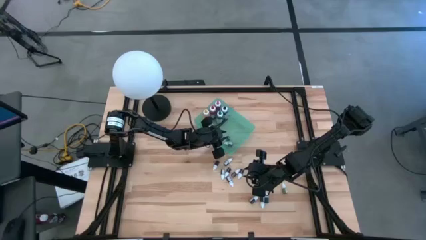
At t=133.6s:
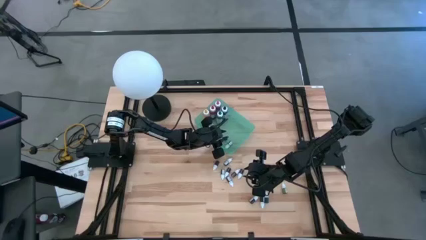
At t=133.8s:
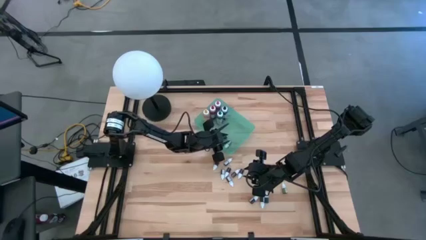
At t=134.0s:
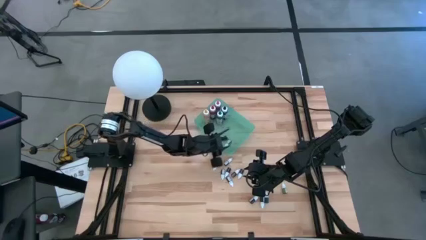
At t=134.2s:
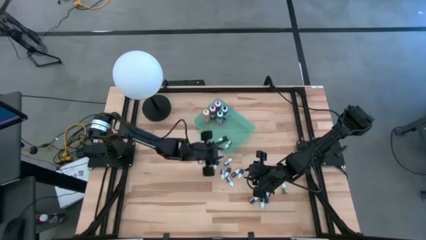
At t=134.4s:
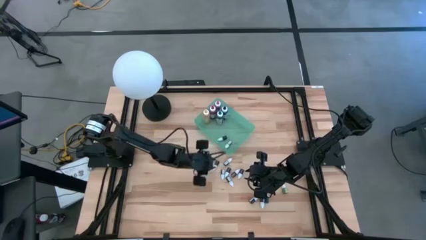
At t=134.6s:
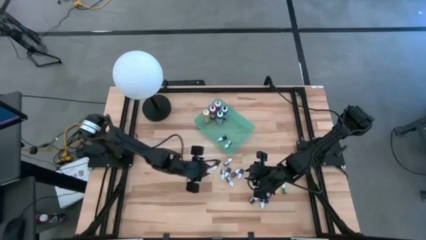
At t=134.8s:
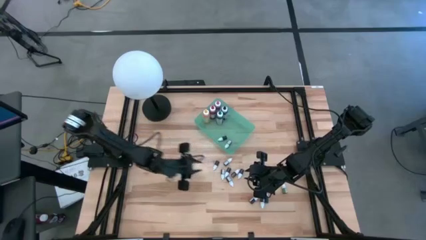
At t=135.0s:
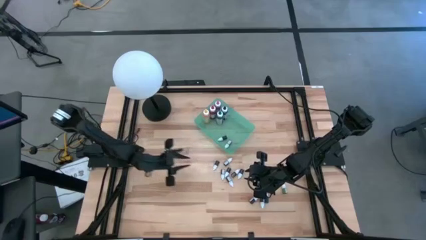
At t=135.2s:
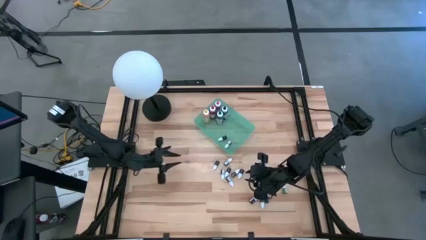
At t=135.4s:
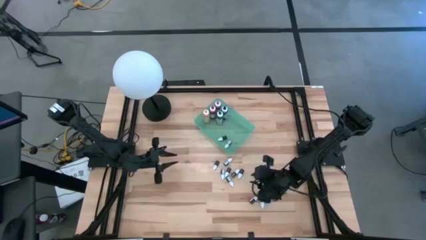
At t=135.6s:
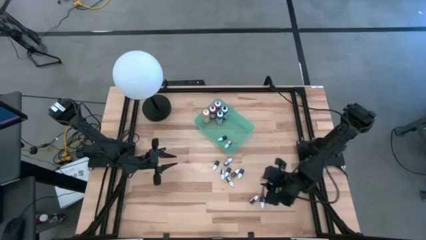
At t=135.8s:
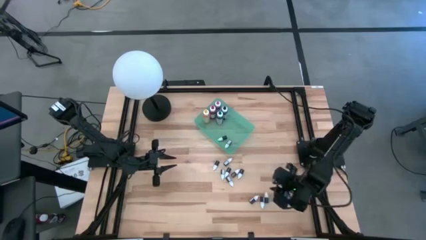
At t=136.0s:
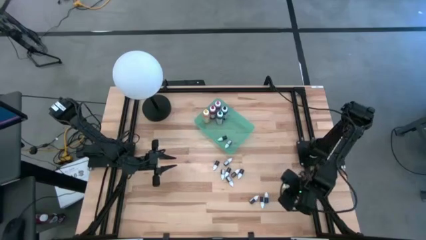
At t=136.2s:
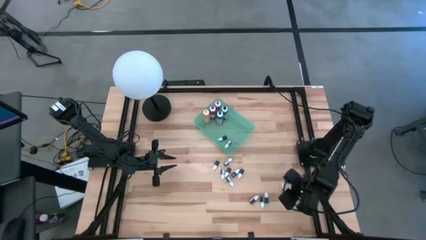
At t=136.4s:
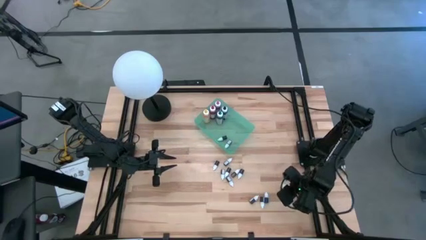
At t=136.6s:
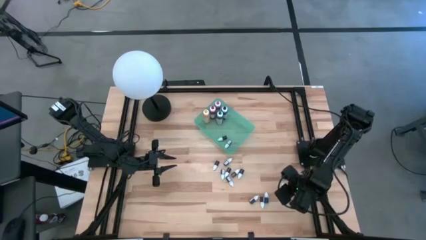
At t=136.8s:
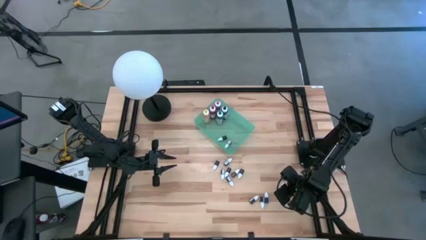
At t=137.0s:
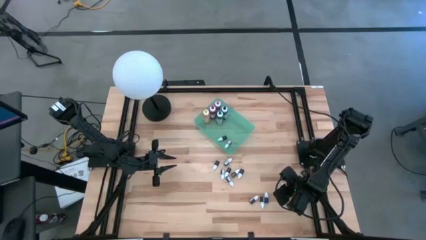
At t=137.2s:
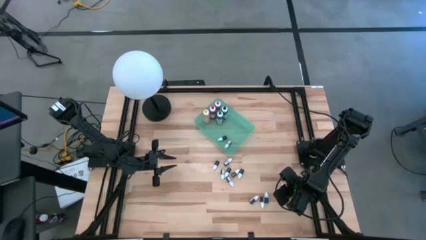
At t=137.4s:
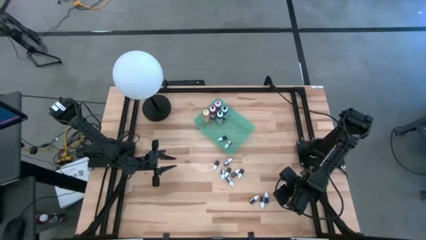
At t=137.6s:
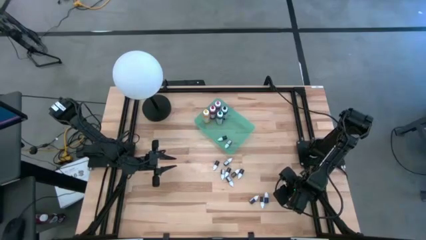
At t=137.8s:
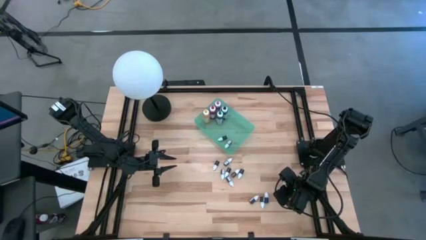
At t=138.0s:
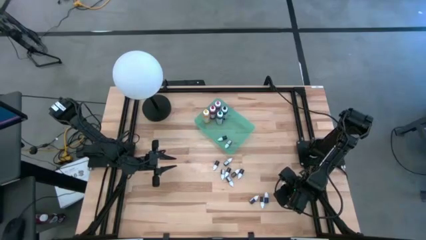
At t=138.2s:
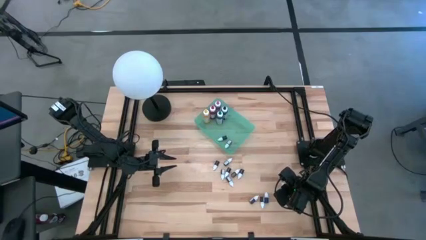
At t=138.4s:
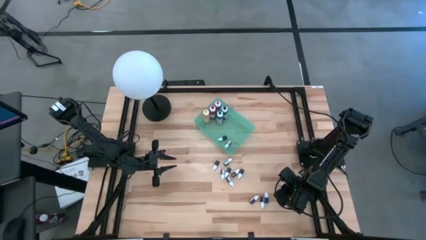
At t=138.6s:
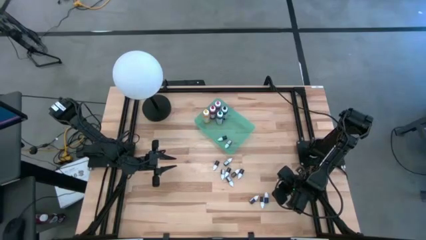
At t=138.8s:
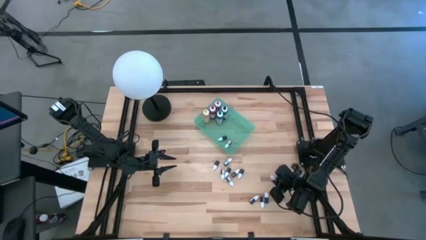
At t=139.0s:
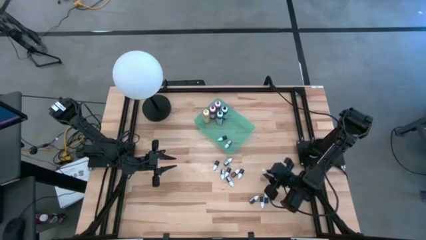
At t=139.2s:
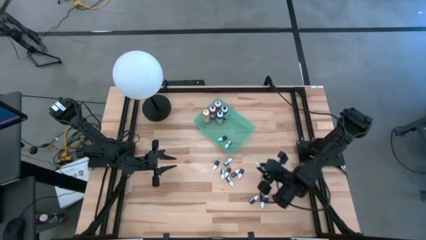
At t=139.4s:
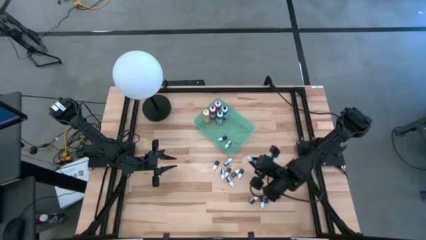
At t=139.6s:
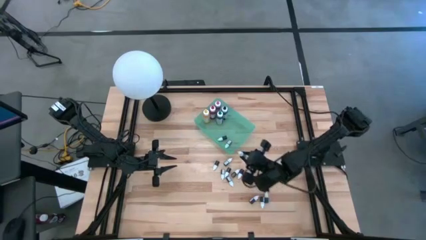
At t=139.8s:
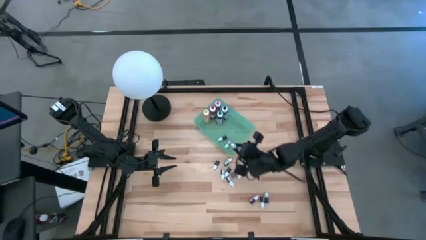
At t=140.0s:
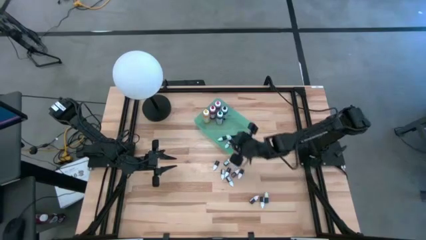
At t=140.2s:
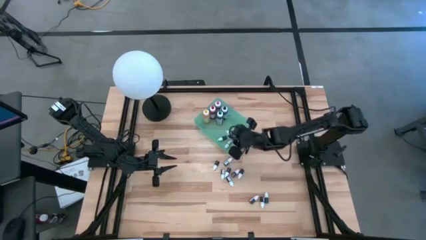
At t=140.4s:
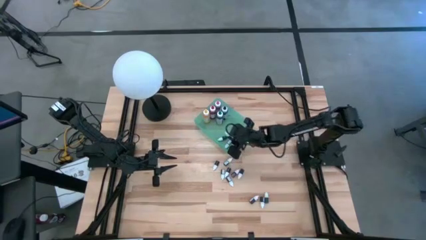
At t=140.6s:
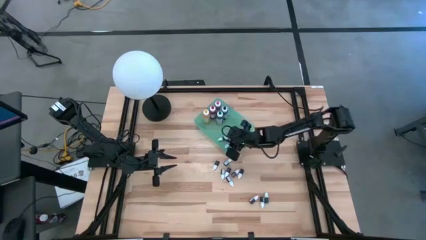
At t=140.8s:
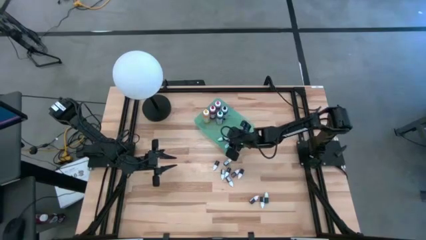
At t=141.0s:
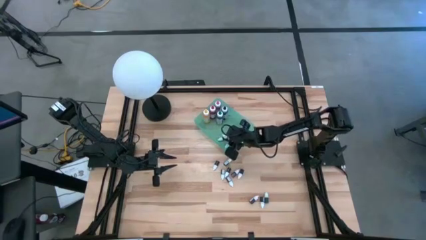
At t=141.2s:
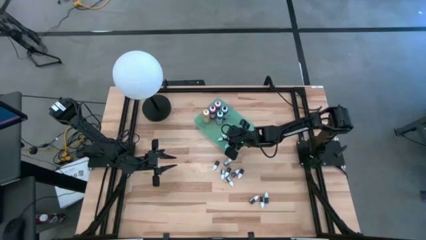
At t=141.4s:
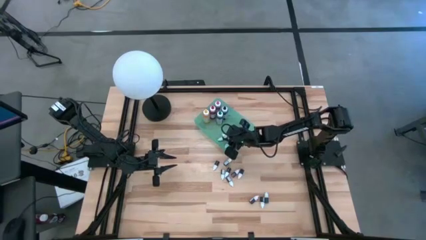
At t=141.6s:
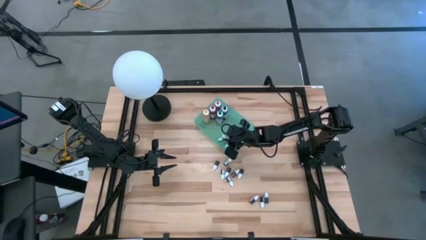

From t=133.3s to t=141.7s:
Task: Pick & Place food coloring
Put the small green food coloring bottle into the green bin

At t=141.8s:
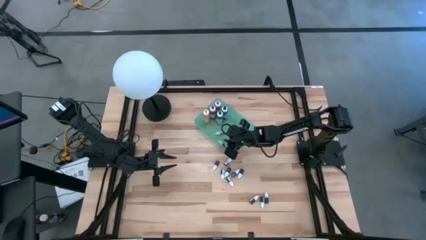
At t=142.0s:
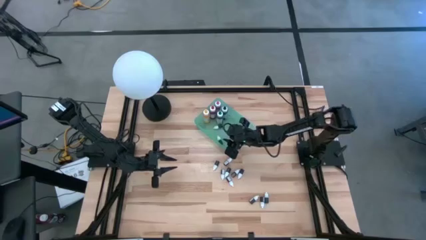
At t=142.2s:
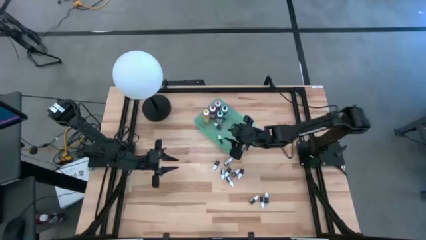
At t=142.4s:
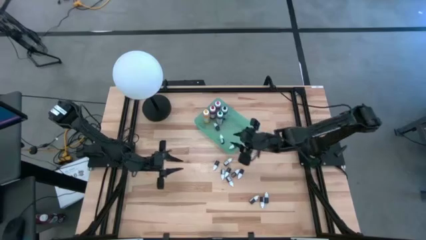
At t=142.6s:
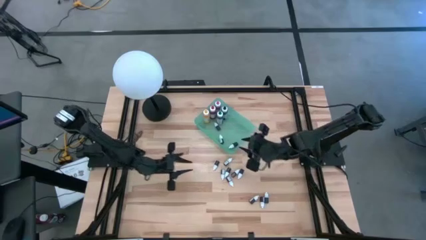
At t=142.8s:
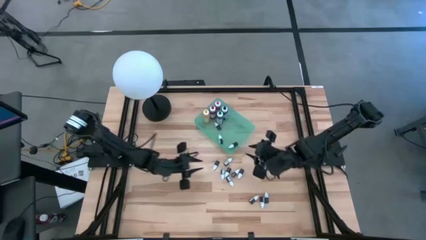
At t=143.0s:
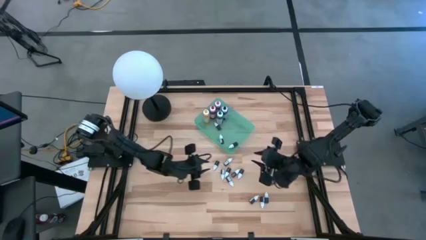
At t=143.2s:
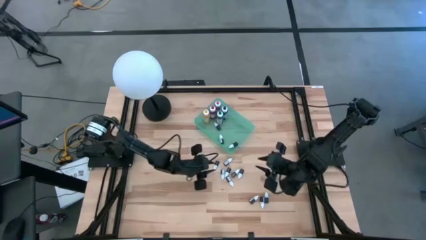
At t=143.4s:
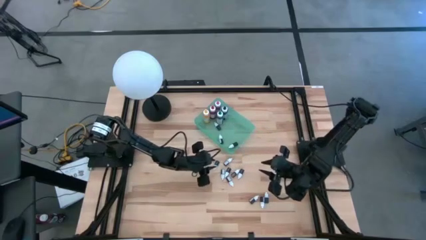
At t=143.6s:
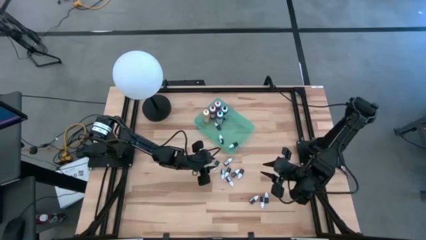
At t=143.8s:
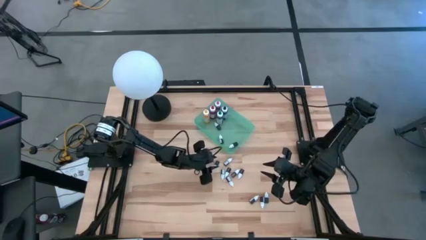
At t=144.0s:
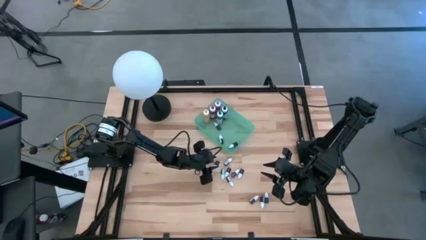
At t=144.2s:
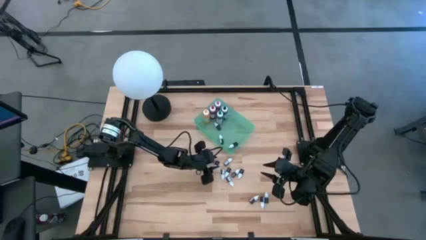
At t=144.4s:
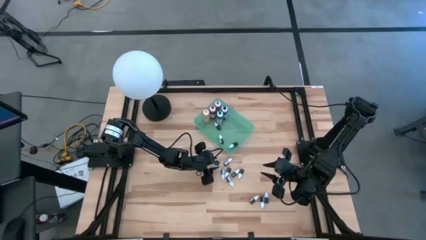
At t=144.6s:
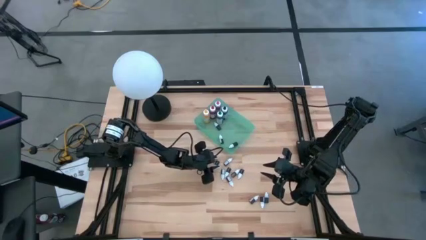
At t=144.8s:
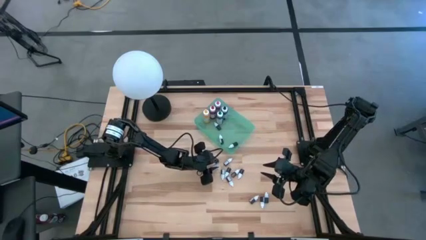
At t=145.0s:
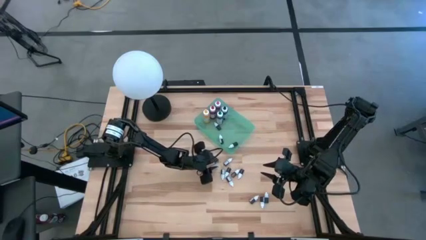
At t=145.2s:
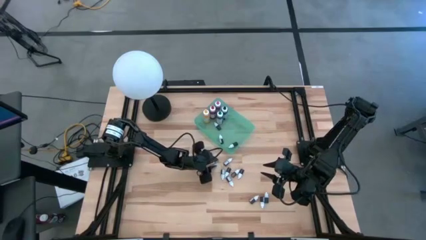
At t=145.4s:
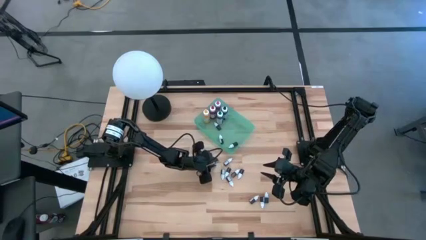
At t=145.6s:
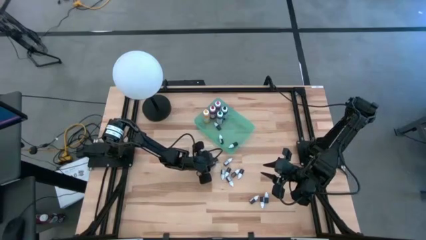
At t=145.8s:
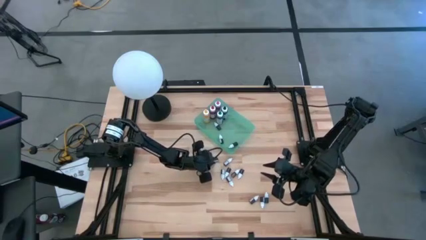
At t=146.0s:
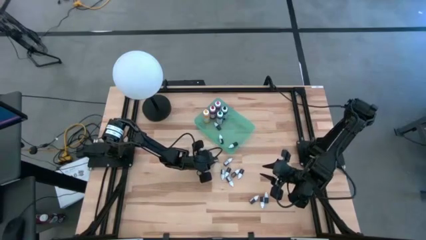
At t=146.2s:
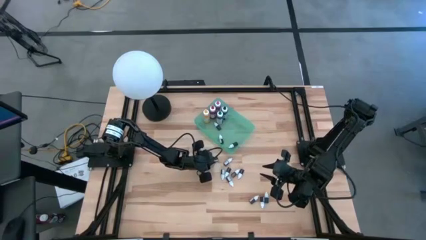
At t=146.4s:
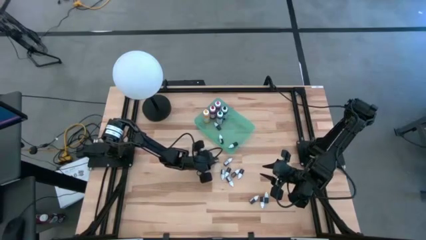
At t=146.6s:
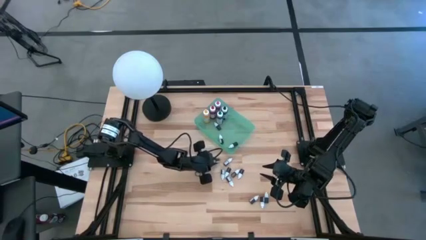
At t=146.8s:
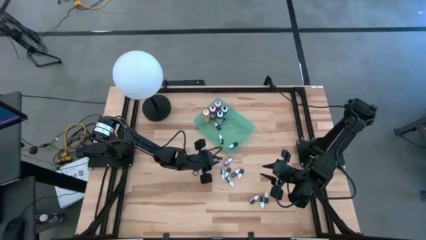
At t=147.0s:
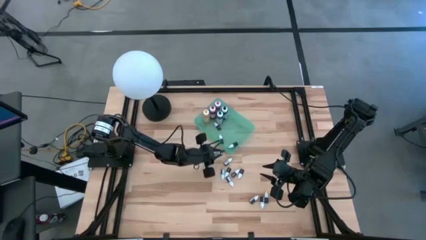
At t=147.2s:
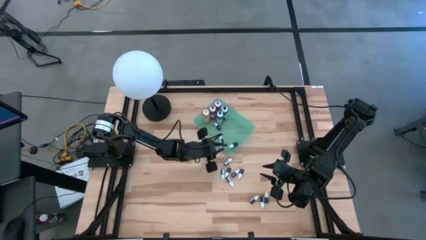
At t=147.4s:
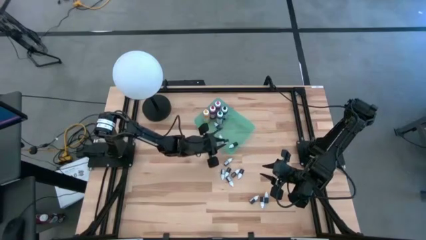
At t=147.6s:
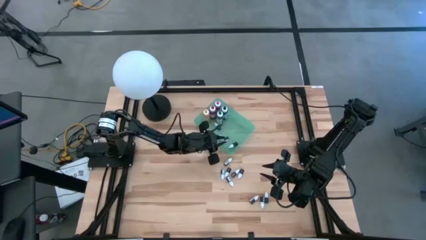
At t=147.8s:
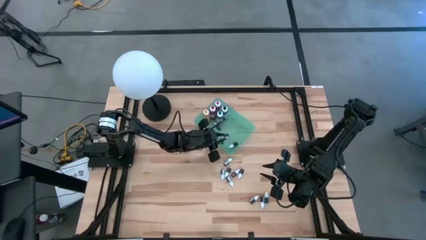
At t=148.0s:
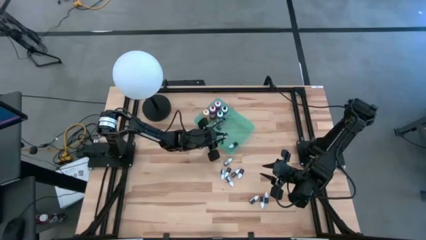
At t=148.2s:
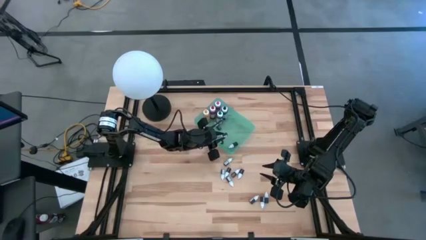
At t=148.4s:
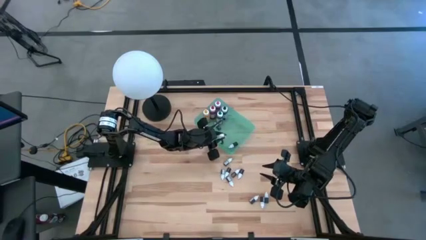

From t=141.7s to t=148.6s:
Put the small black food coloring bottle into the green bin
